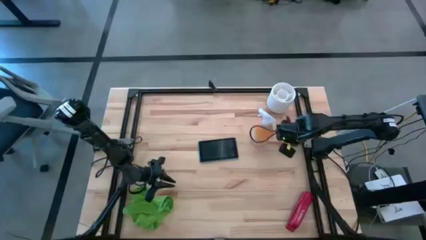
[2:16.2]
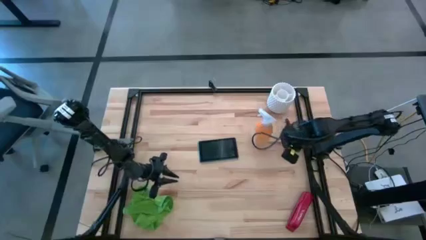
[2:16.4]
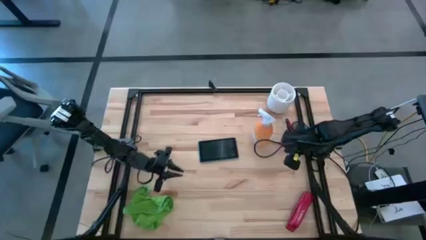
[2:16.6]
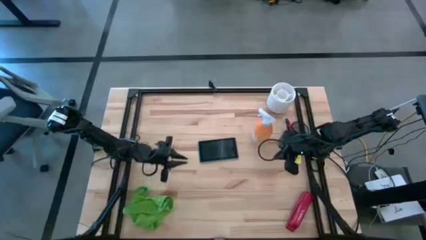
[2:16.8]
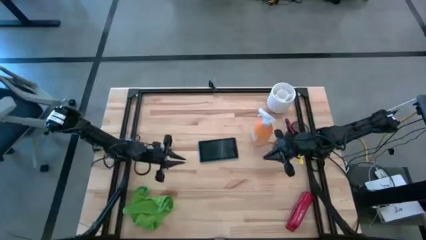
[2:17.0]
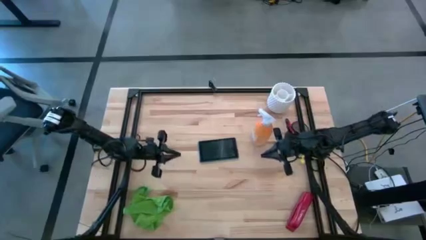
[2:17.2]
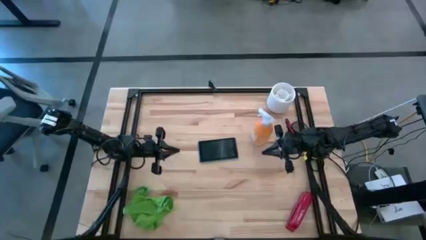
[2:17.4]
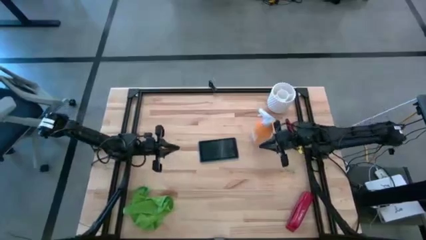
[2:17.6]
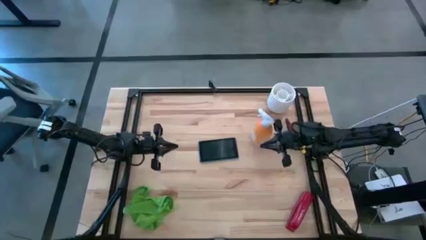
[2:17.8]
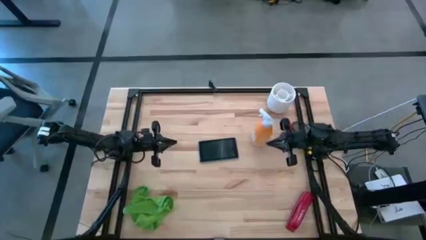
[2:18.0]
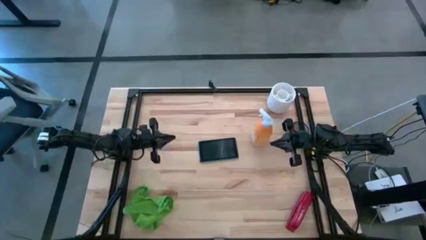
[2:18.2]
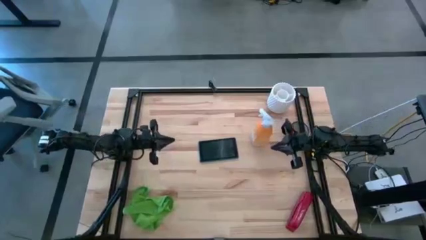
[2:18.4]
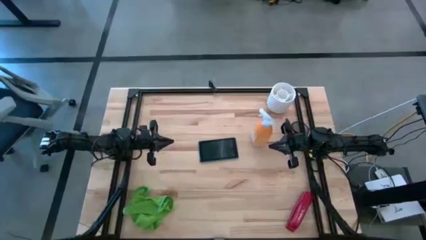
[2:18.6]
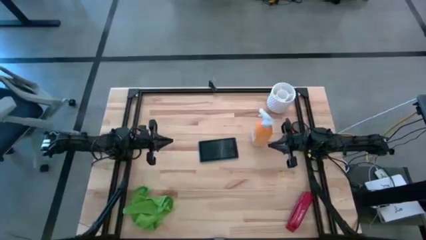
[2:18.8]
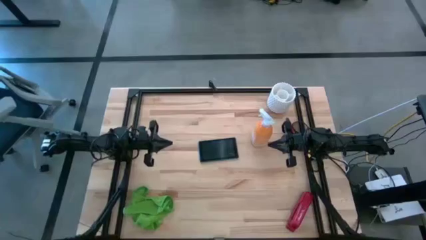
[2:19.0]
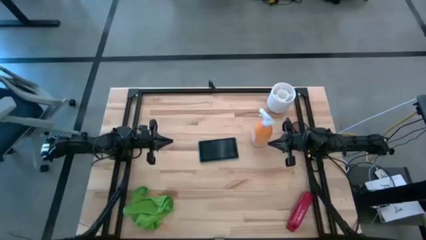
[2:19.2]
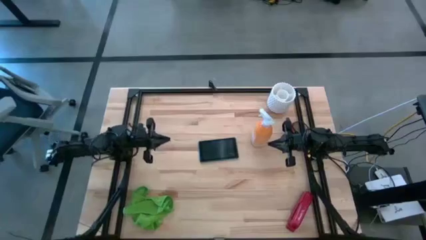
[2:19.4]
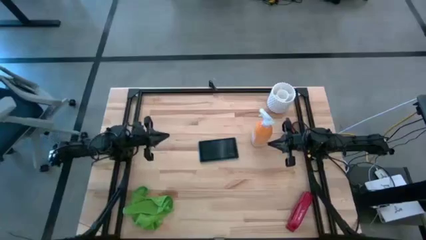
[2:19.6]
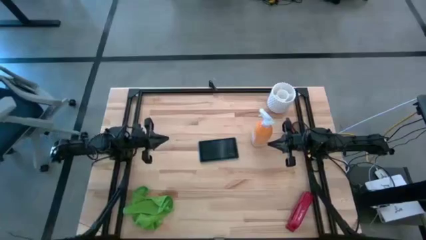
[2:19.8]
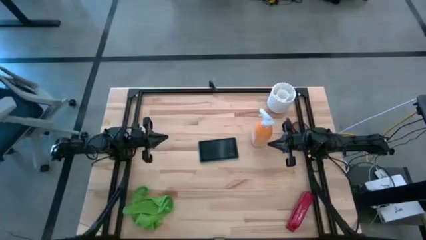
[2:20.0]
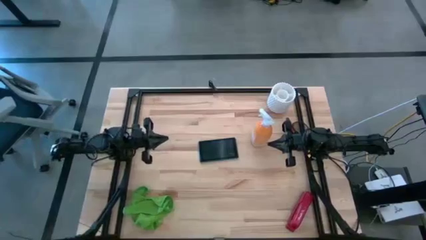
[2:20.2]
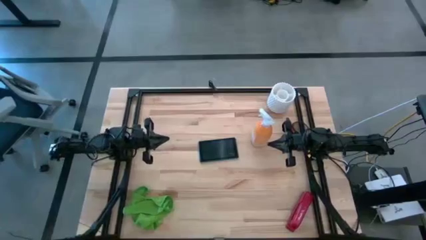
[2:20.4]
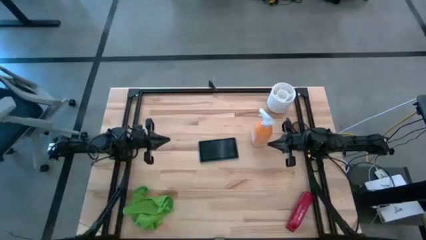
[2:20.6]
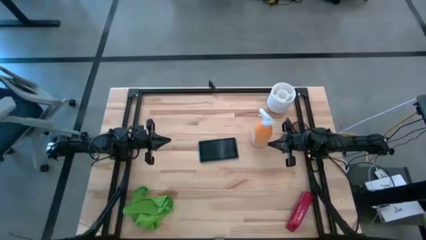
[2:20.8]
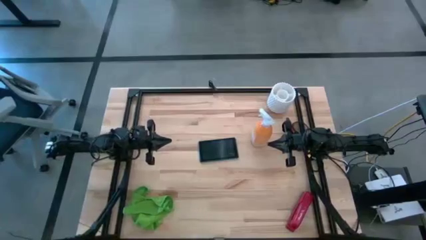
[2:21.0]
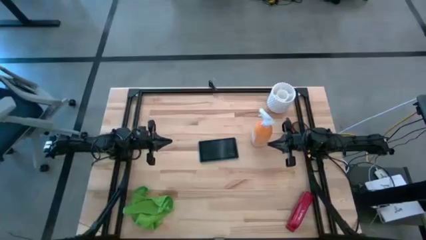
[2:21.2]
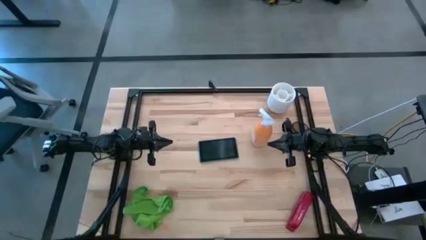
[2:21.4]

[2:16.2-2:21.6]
Task: Apply microfiber cloth
Return to Home Position

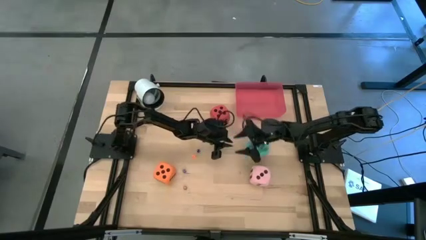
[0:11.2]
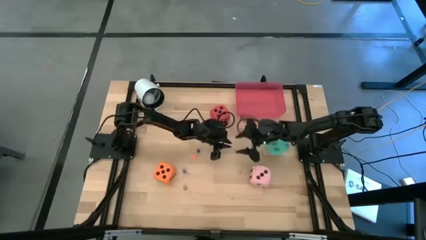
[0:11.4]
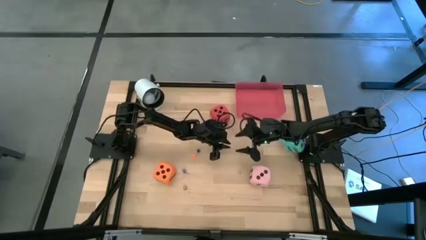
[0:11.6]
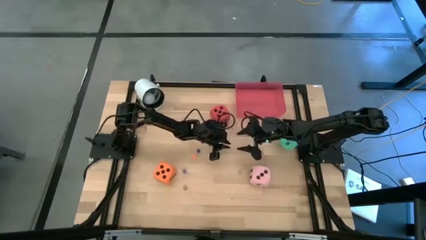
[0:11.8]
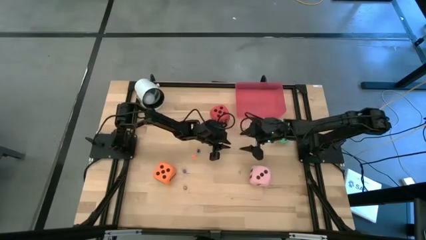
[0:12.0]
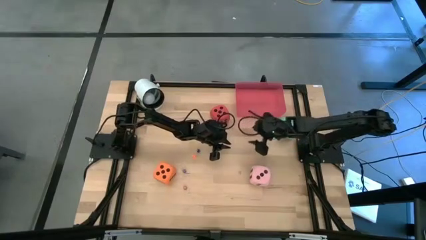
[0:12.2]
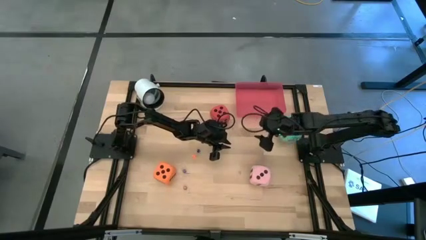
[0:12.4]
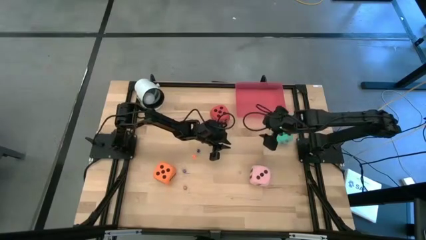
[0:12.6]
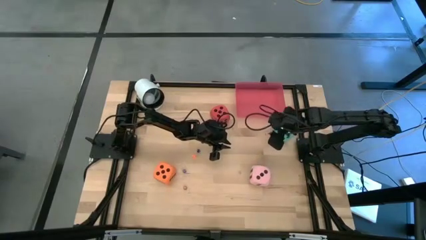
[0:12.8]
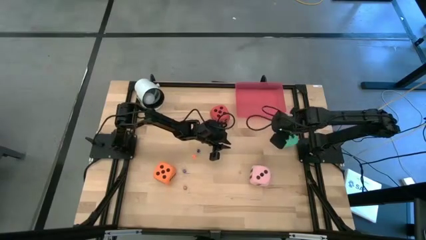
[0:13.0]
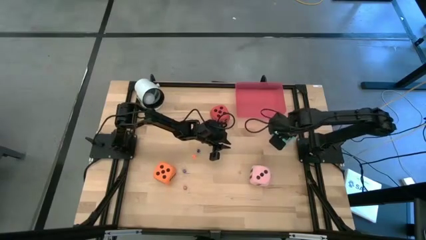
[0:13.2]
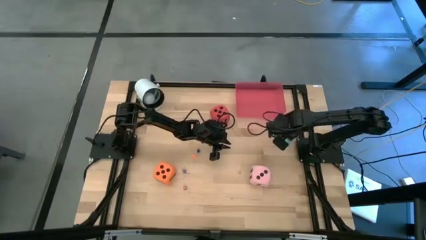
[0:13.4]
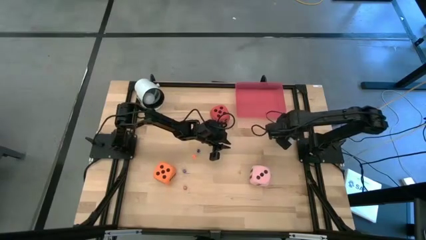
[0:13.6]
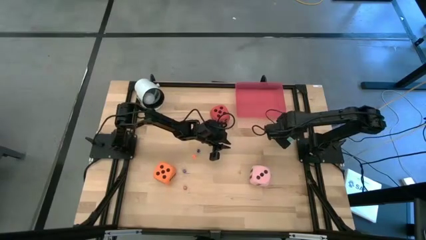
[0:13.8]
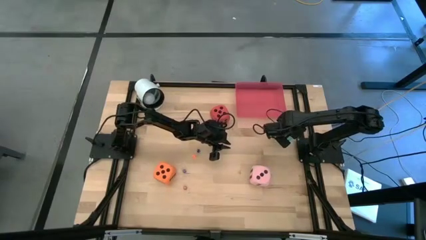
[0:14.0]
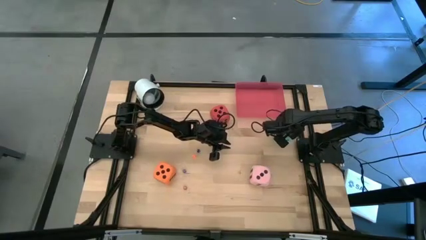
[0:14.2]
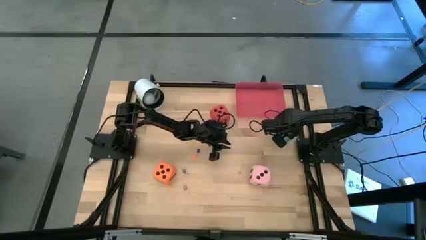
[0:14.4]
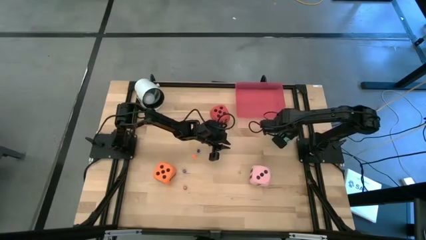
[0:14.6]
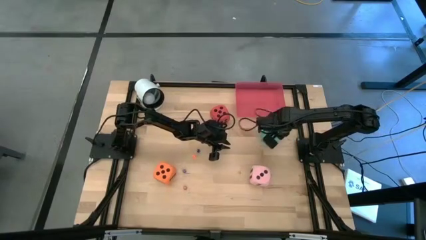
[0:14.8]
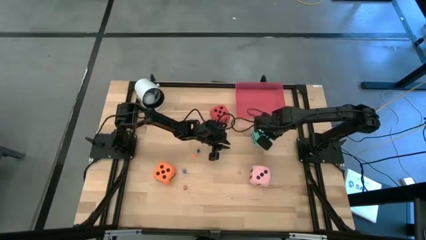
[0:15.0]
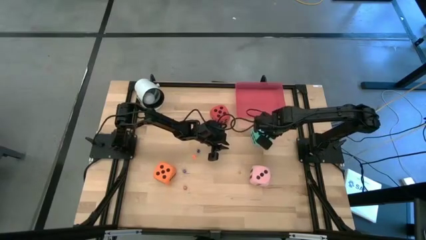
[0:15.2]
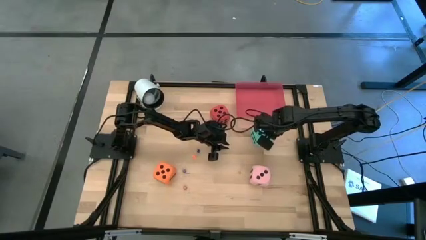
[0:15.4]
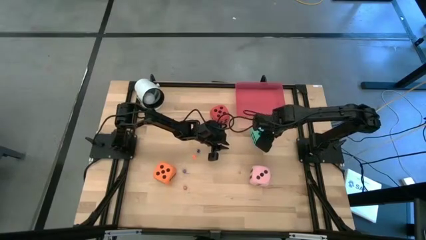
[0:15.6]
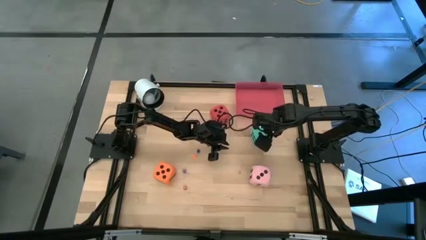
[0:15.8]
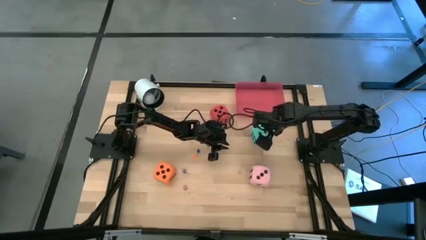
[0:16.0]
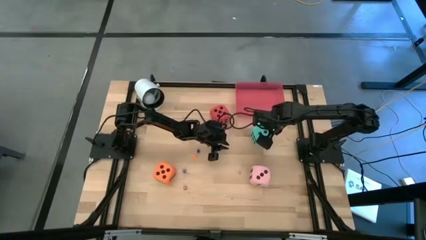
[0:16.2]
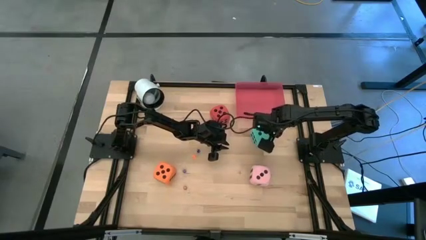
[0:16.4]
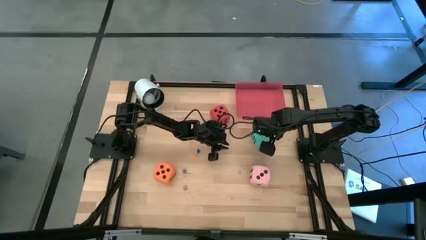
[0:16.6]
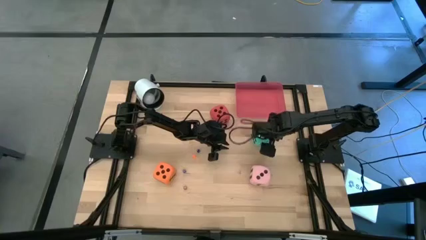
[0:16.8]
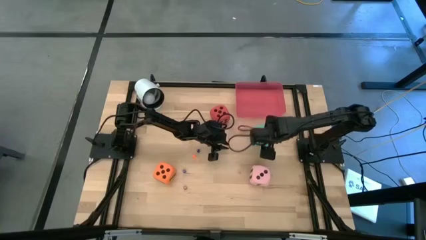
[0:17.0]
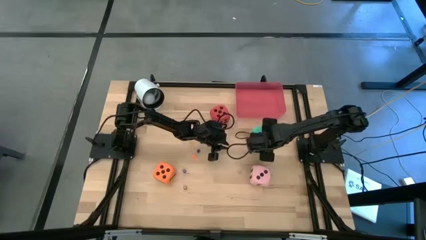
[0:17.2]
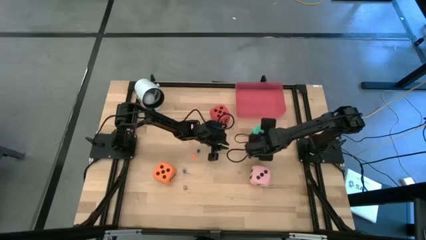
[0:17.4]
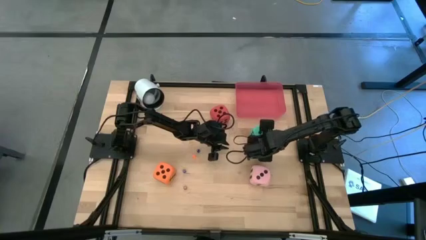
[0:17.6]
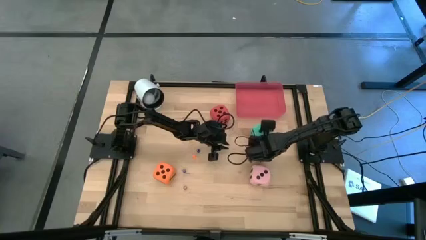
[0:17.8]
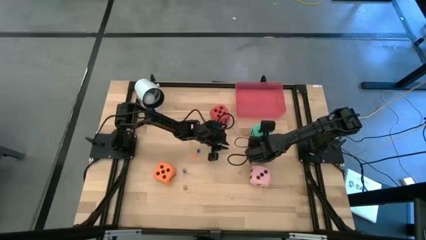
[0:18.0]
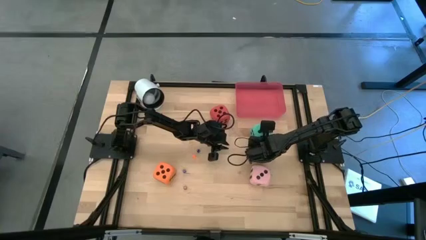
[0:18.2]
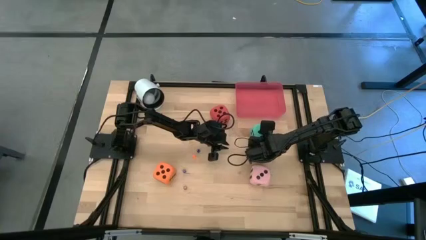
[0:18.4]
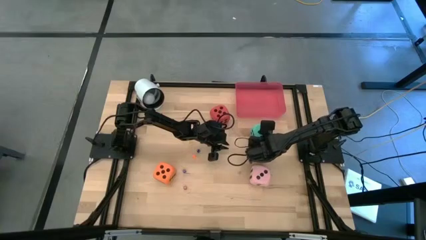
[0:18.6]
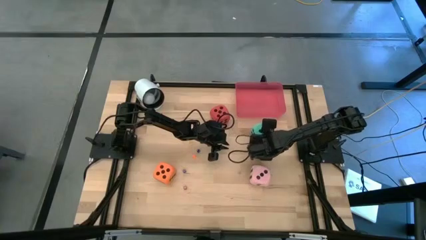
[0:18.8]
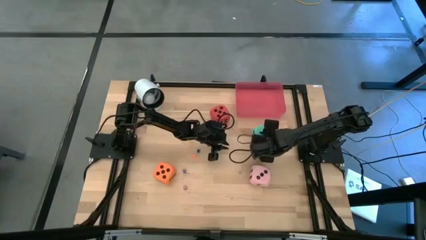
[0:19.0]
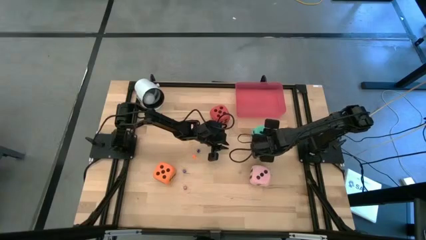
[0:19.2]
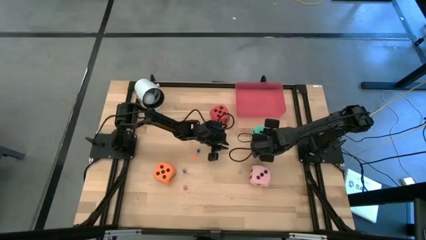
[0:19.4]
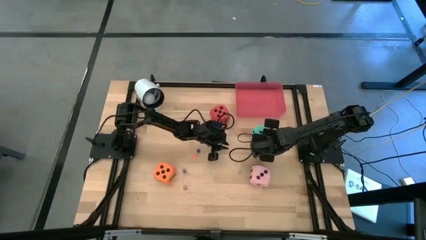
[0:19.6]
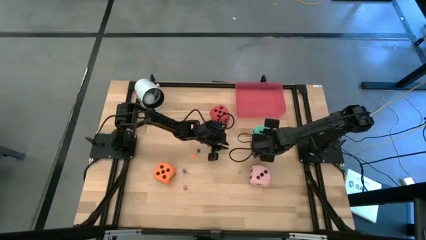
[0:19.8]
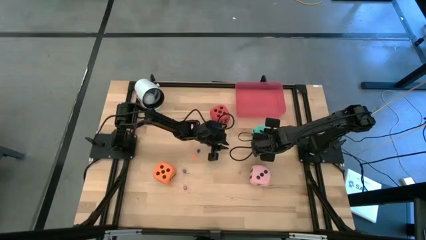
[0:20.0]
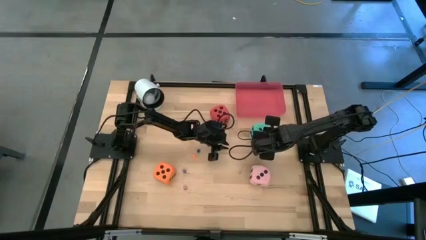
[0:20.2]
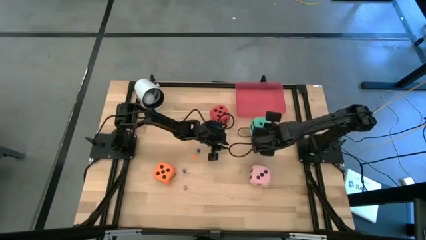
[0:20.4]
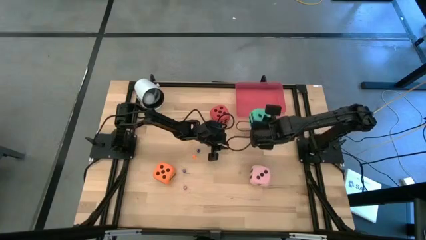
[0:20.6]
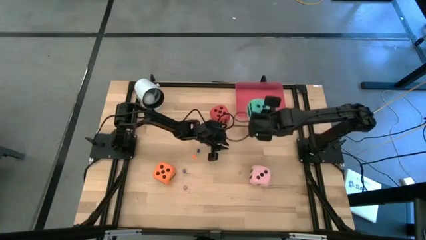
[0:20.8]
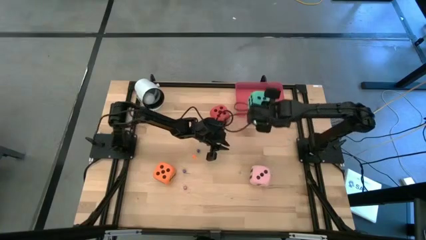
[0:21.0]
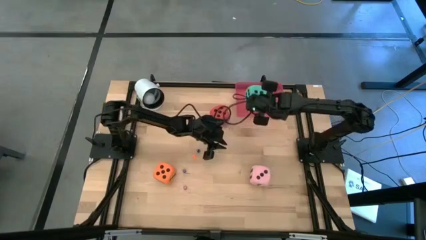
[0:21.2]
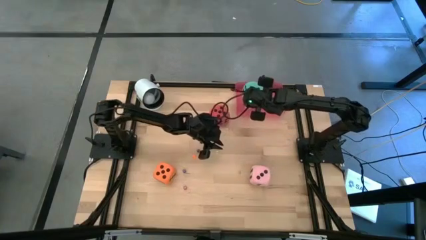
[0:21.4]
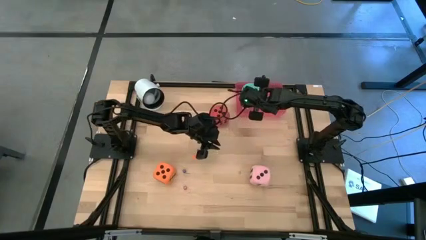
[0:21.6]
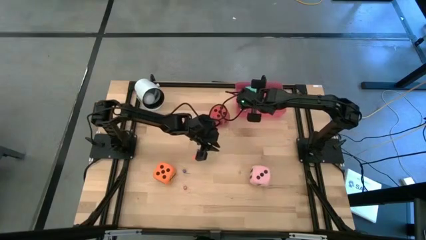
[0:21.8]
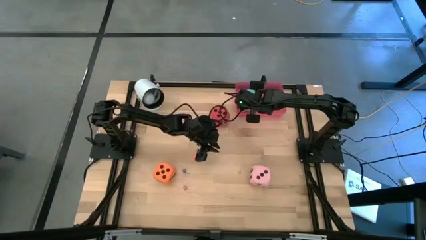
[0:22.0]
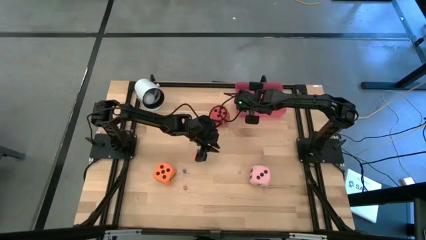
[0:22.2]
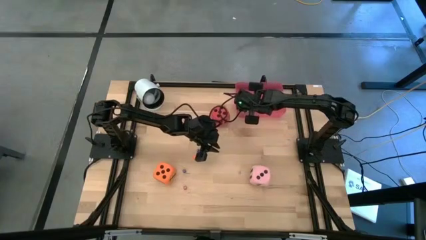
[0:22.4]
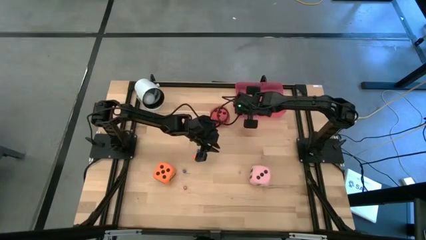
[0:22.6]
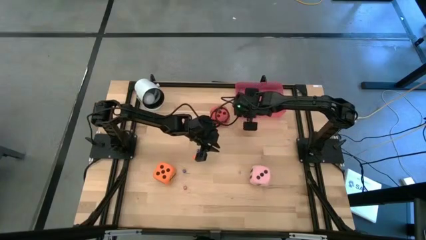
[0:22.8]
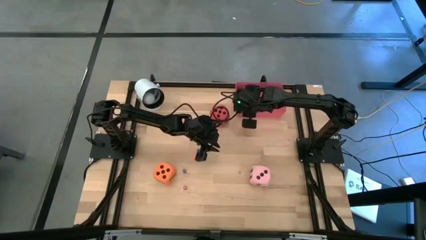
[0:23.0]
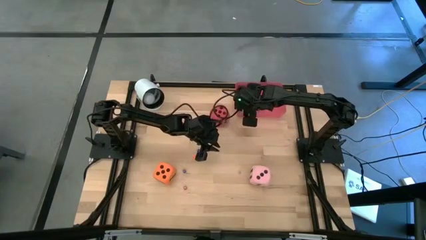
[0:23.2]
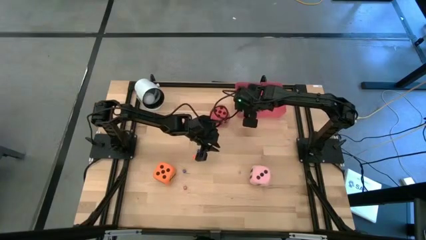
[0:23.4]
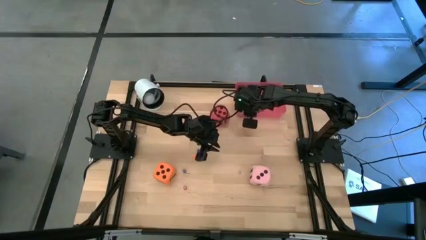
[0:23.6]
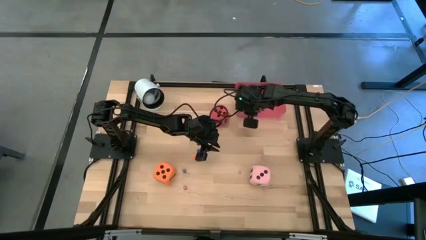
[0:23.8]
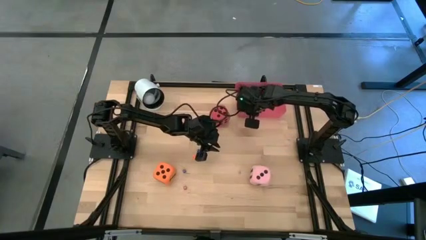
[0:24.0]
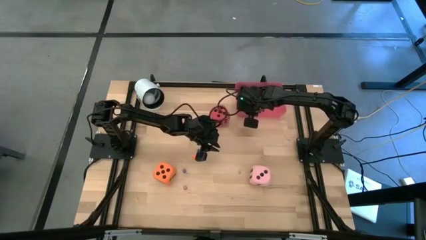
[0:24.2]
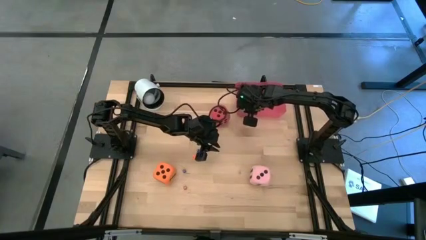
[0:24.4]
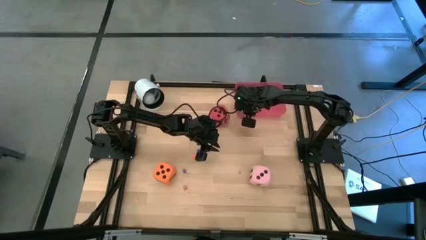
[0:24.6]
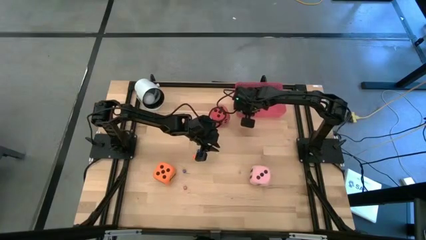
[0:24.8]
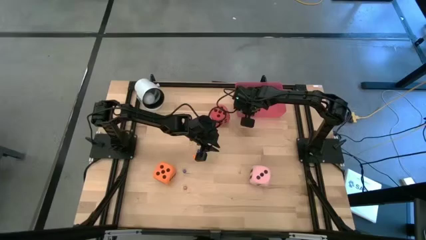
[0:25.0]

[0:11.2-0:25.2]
Task: Pick & Place Dice
Put the large blue dice into the red bin
